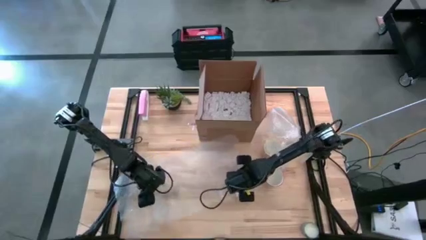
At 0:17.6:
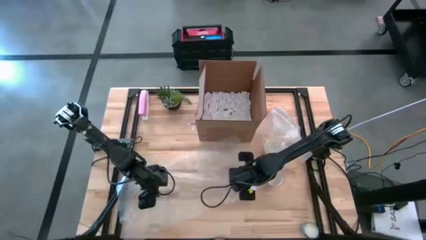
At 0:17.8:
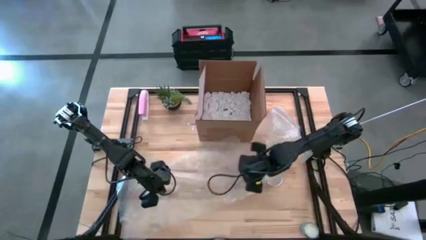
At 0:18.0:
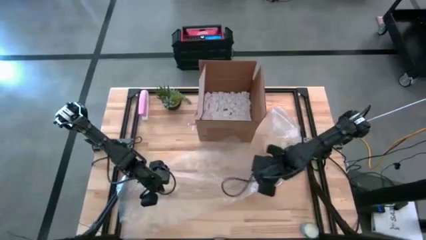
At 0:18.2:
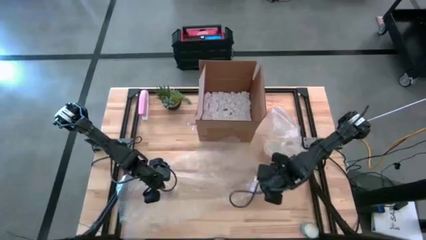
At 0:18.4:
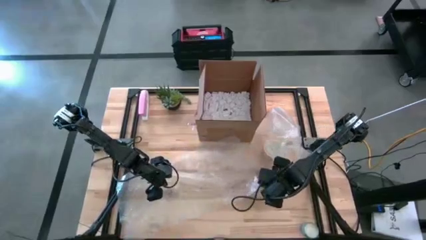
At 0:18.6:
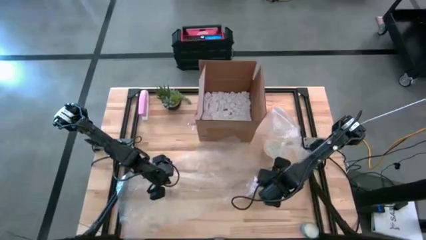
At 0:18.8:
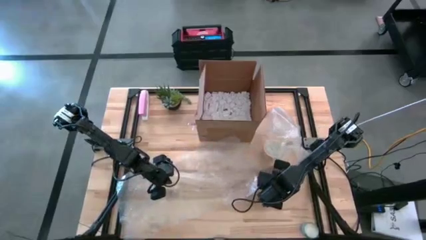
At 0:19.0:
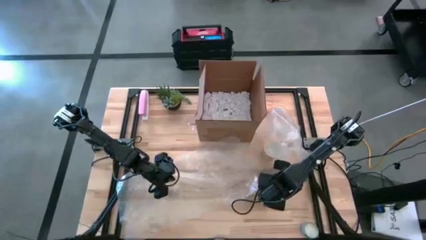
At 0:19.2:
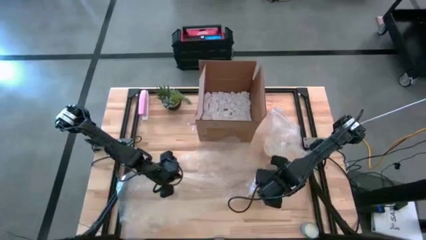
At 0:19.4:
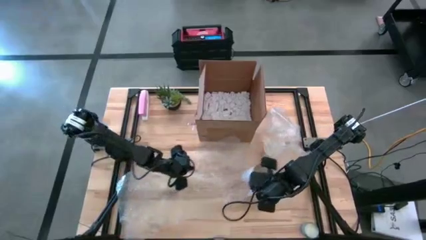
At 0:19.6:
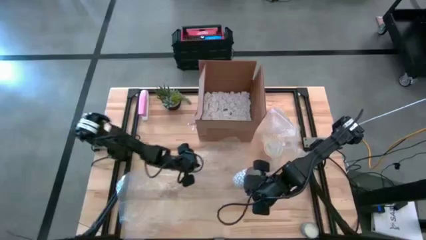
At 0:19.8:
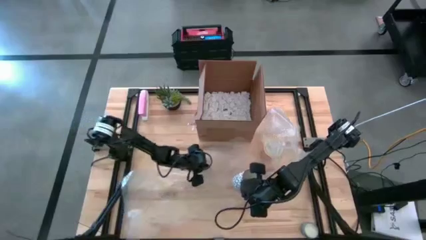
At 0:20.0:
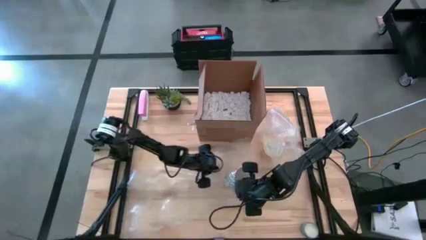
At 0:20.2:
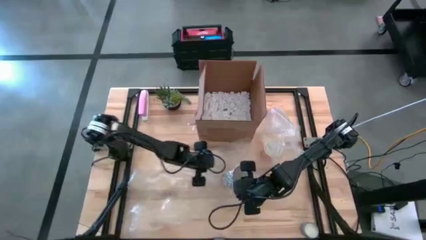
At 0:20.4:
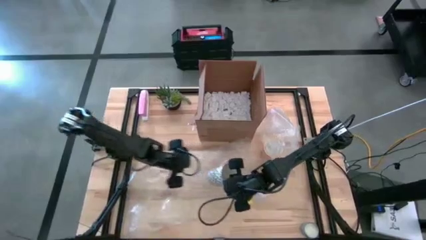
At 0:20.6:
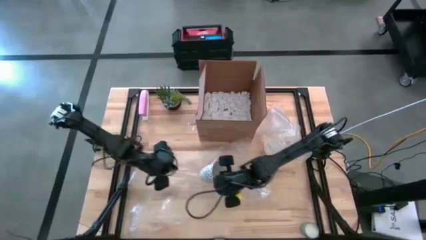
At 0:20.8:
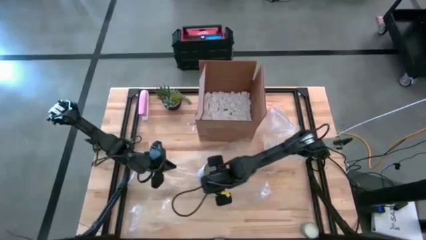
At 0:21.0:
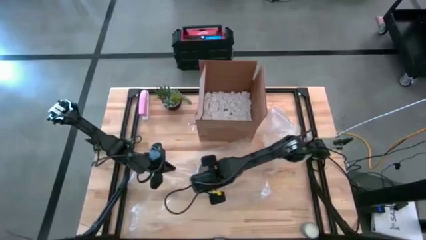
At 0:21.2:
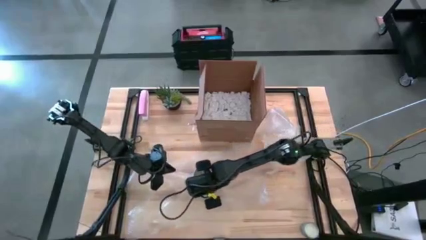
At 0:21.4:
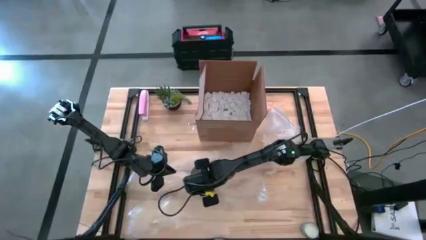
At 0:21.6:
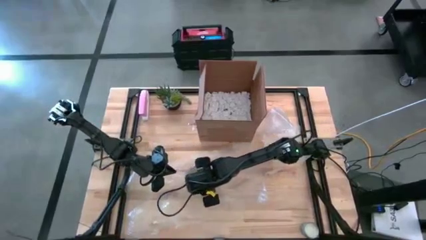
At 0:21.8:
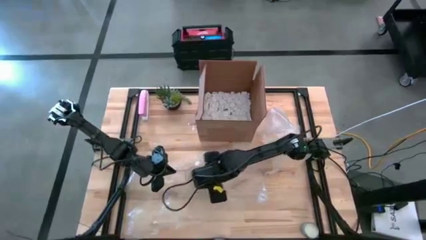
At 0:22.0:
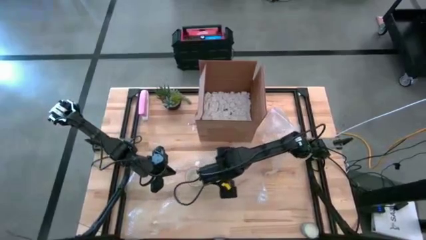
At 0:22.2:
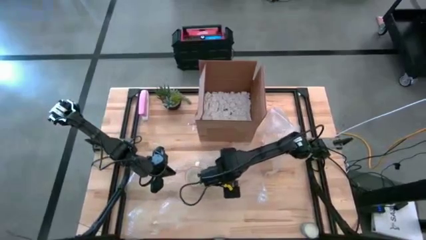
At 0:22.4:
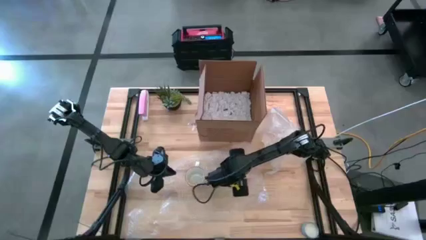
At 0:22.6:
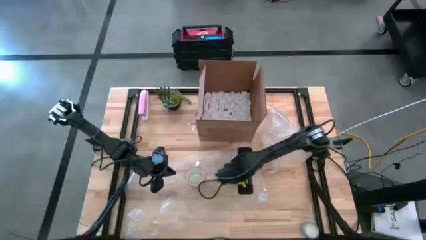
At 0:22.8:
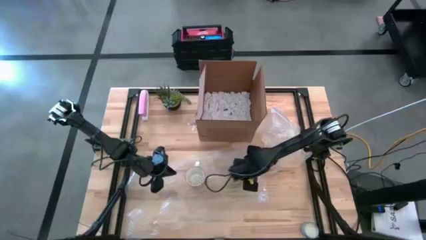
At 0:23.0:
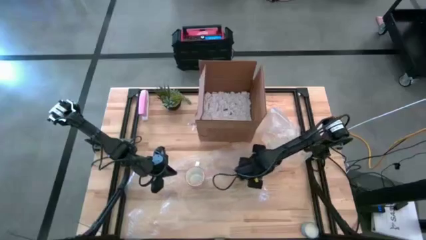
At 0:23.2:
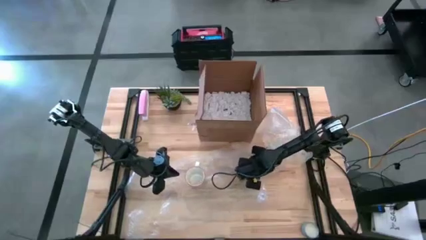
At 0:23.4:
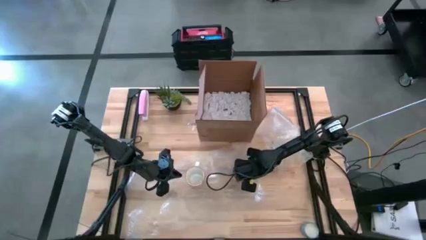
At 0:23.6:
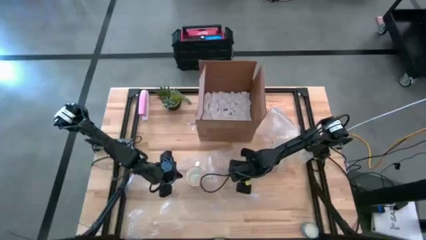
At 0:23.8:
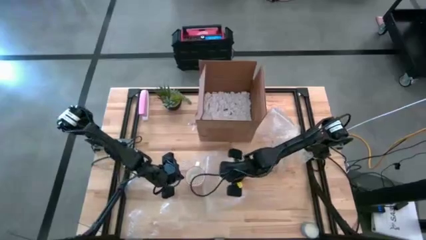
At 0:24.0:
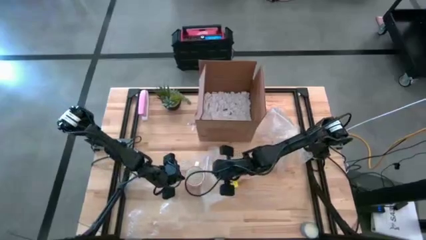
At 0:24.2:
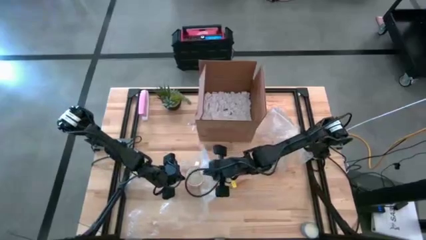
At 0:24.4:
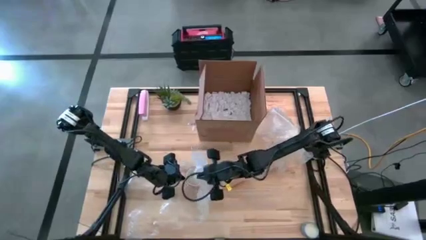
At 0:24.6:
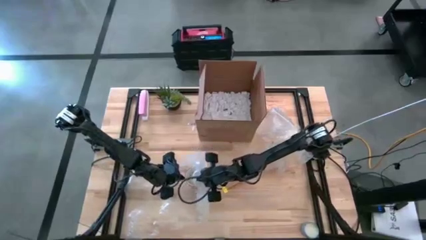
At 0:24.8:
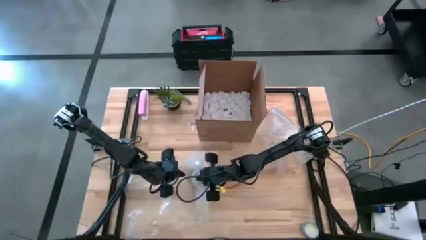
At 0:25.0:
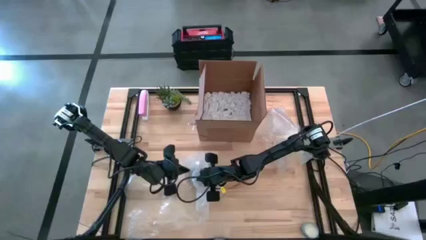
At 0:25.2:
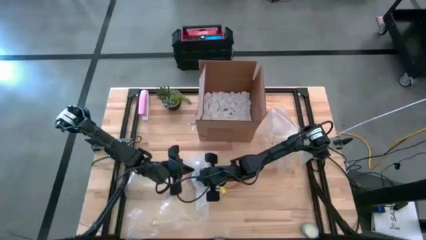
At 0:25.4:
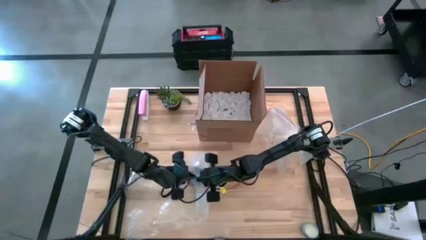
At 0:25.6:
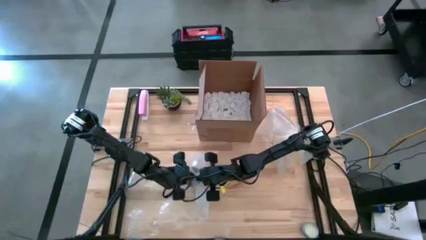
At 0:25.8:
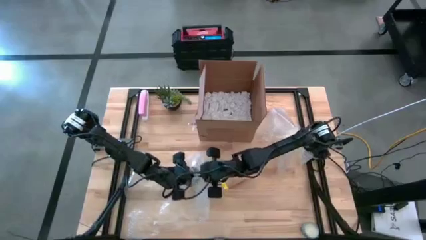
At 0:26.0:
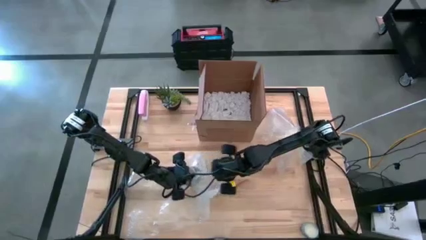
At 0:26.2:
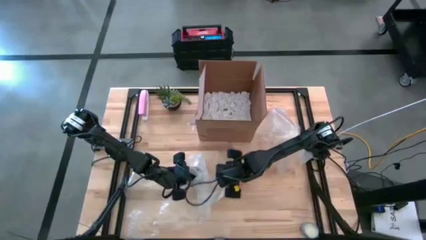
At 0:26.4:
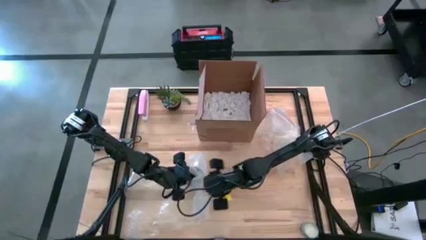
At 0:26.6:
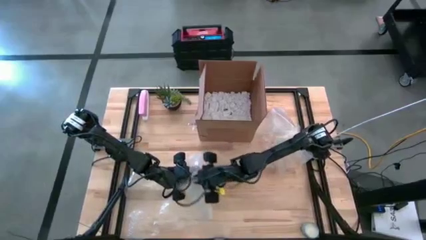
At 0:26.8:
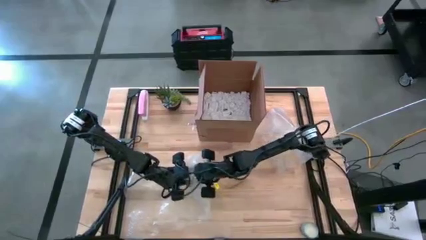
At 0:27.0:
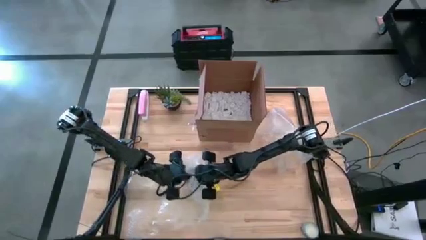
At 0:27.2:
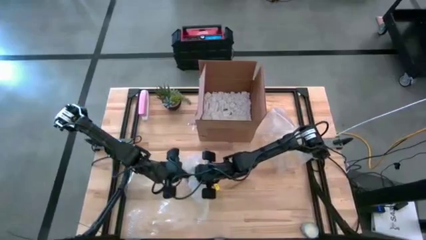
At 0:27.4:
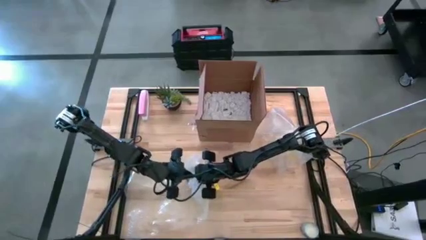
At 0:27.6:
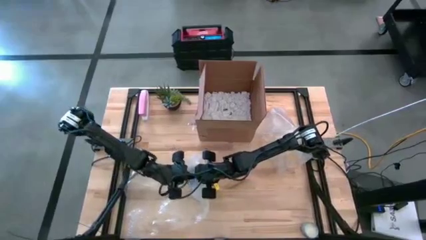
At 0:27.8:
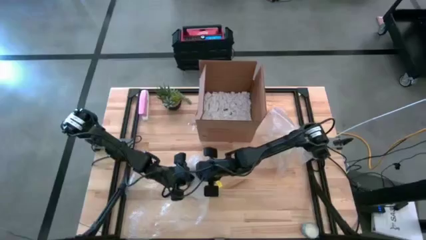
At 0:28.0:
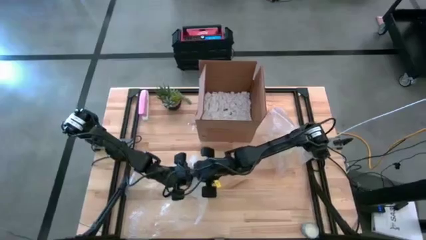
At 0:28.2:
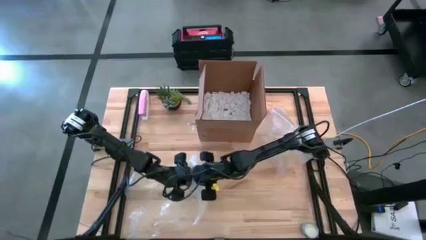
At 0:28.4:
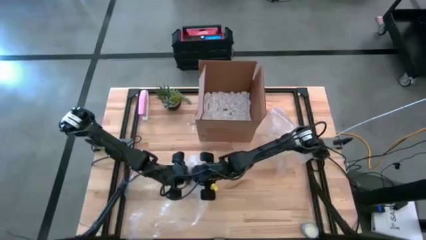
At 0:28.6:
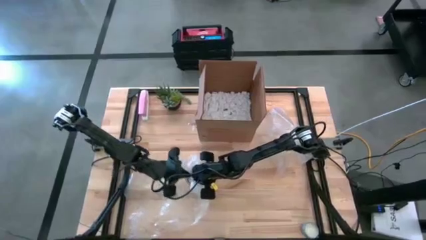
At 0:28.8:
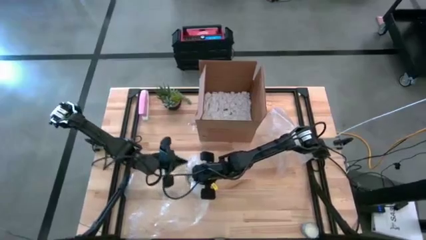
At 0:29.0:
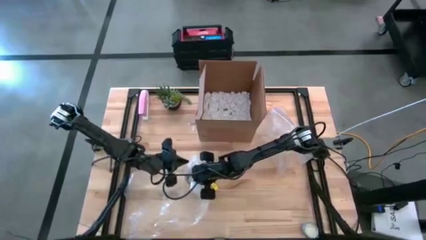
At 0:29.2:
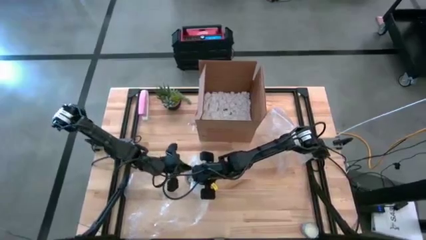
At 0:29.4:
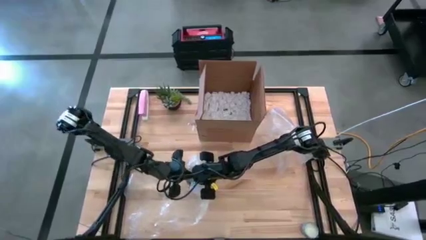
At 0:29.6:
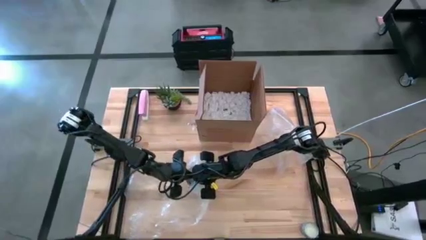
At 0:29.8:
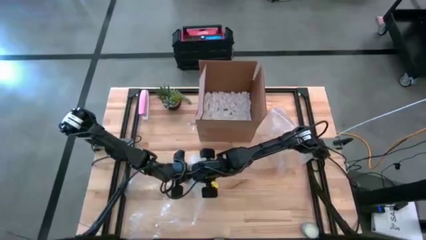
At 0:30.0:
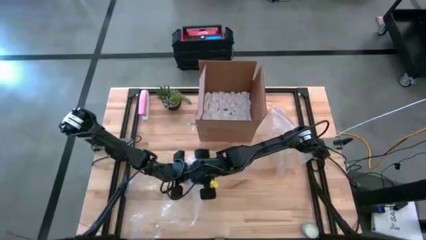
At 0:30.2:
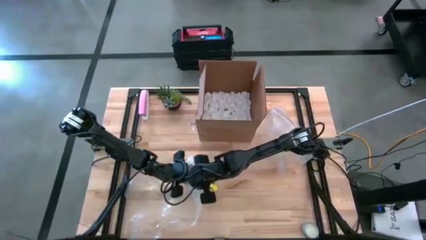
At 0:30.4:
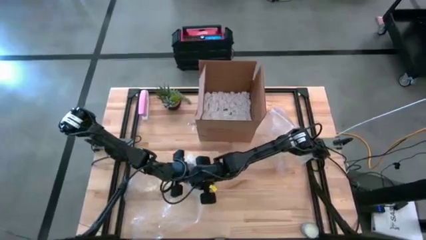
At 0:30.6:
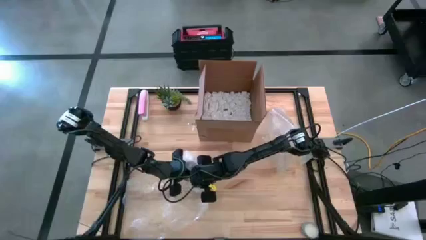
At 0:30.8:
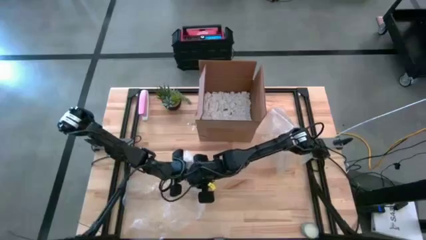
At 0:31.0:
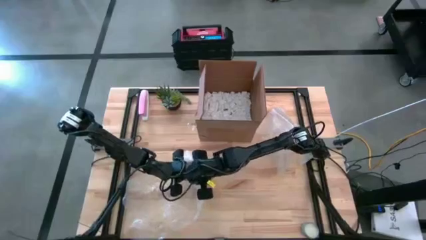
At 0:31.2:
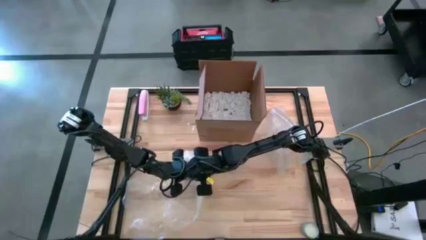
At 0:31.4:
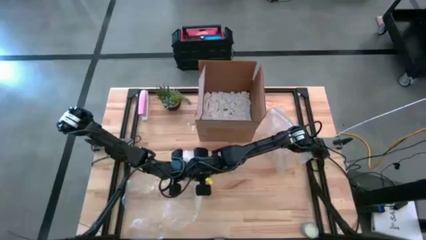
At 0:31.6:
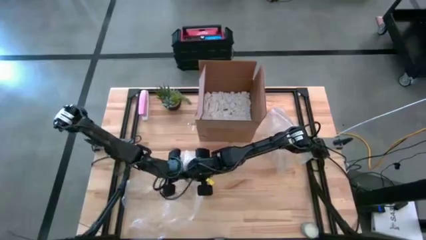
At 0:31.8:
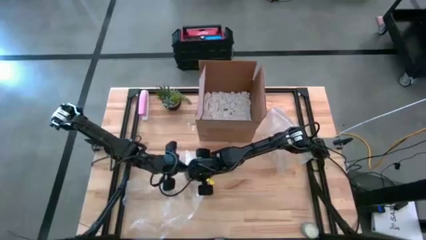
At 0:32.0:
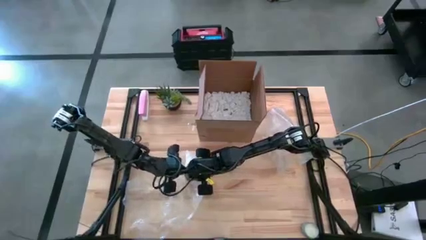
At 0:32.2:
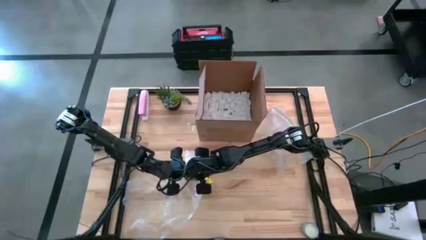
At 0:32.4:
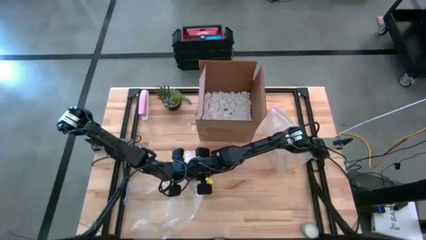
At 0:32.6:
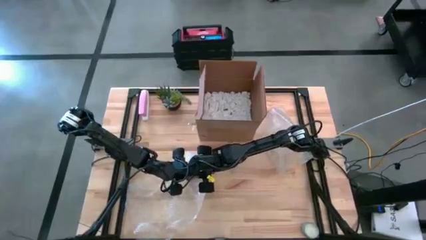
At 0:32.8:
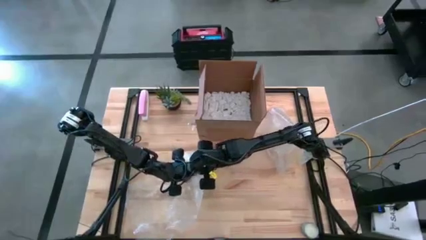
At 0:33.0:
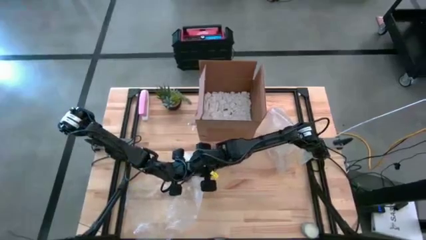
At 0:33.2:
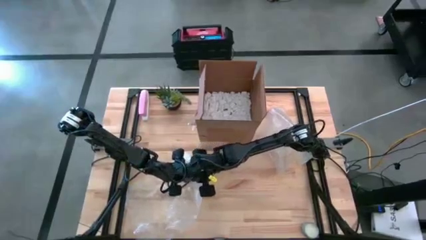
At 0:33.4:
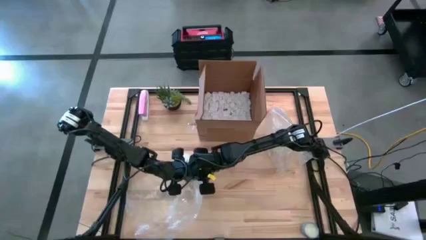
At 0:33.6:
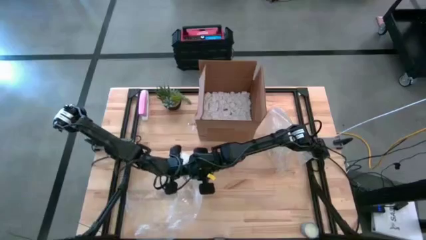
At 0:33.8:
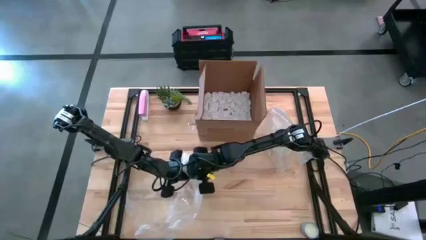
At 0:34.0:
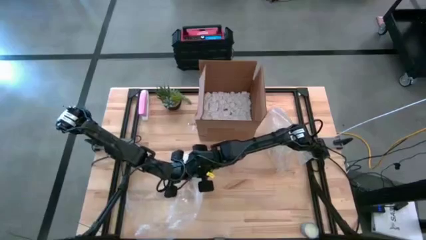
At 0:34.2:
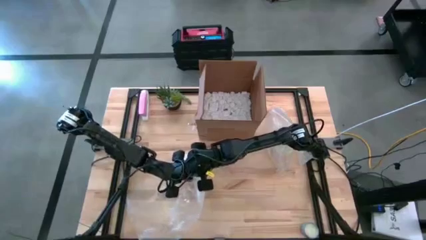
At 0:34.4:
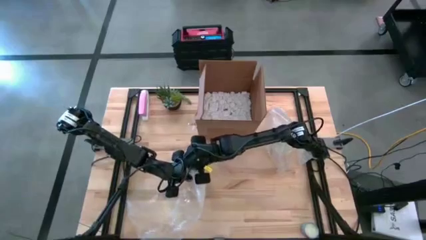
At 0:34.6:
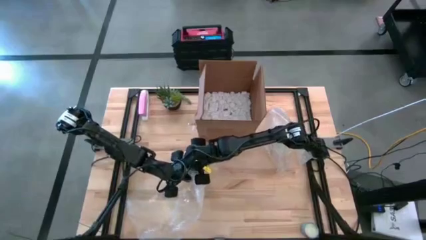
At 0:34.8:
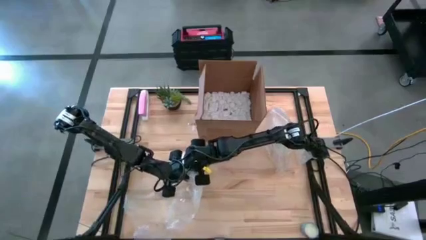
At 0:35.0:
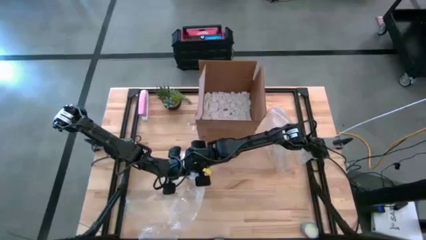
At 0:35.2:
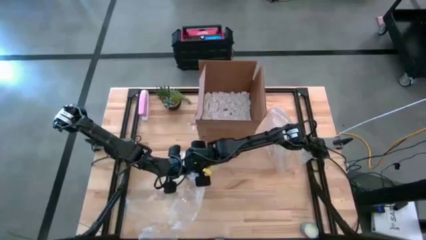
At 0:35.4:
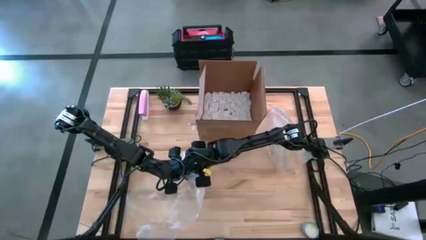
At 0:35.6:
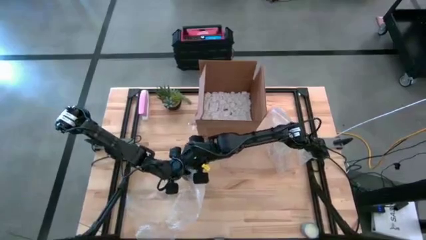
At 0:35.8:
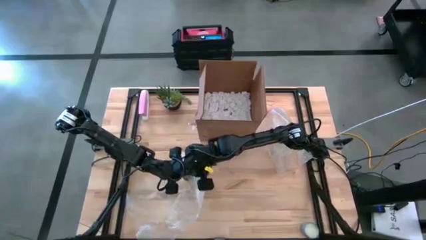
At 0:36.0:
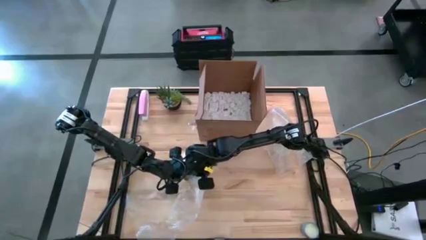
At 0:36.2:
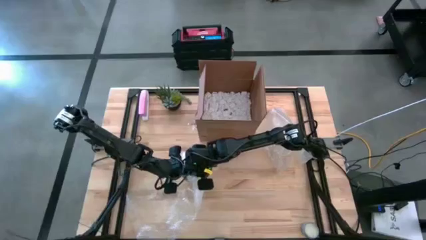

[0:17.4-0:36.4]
Task: wrap mug
Wrap the gray mug with bubble wrap
